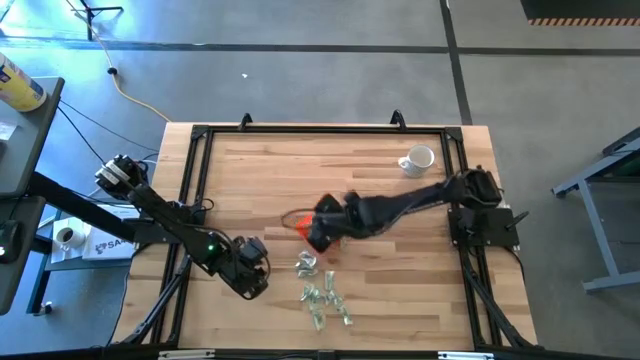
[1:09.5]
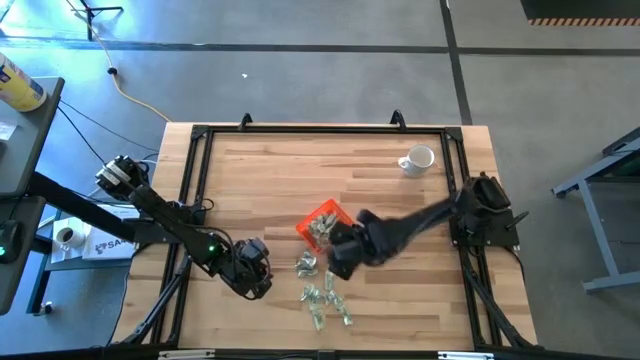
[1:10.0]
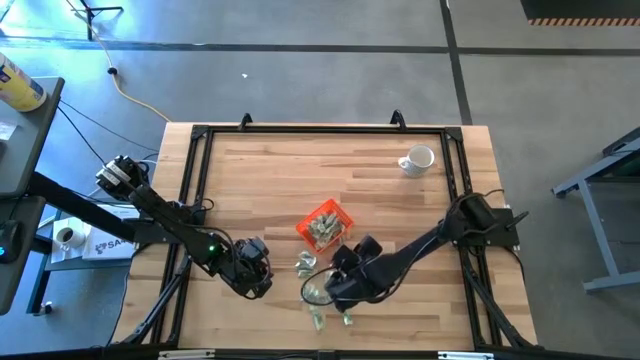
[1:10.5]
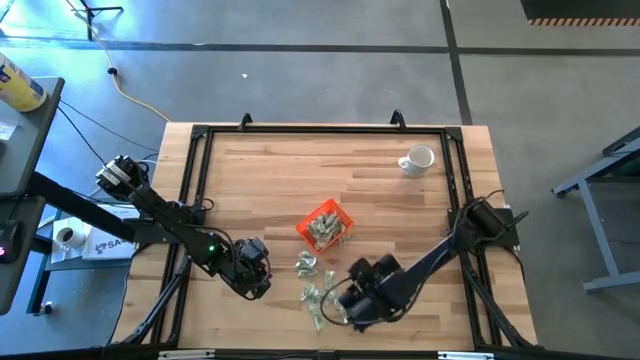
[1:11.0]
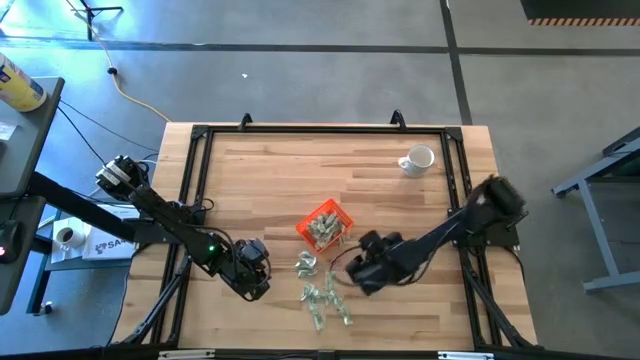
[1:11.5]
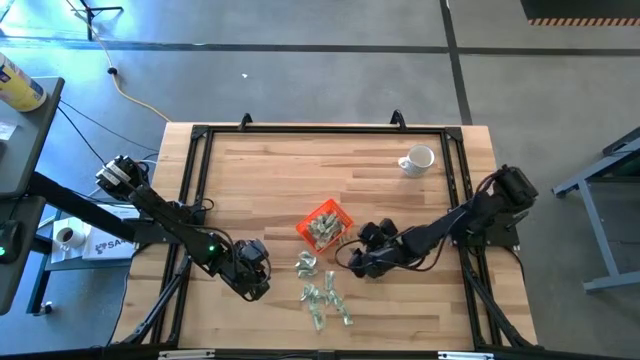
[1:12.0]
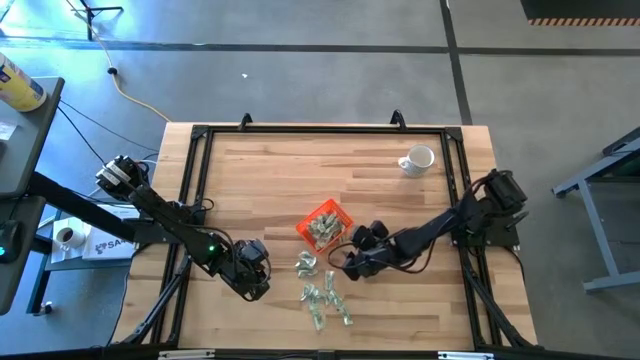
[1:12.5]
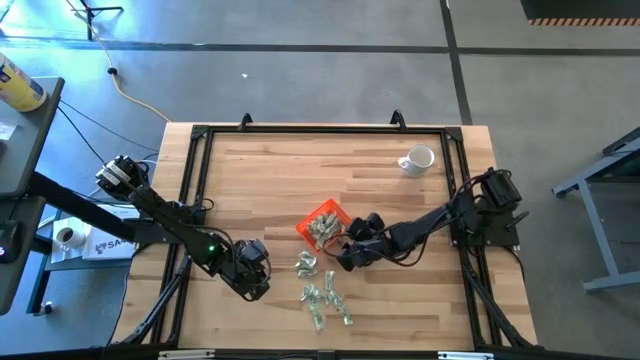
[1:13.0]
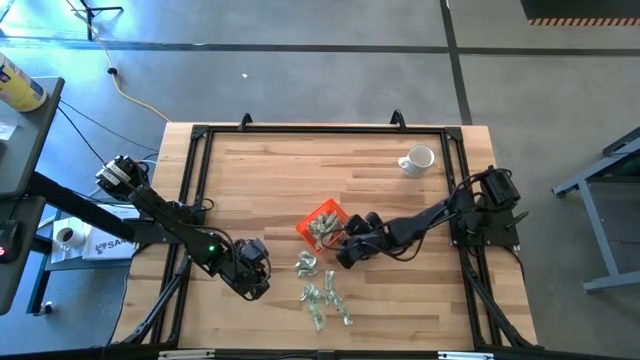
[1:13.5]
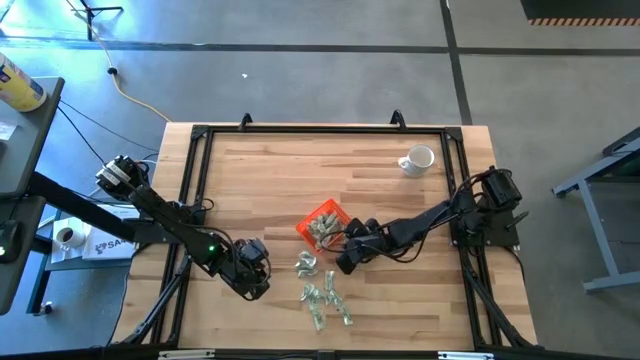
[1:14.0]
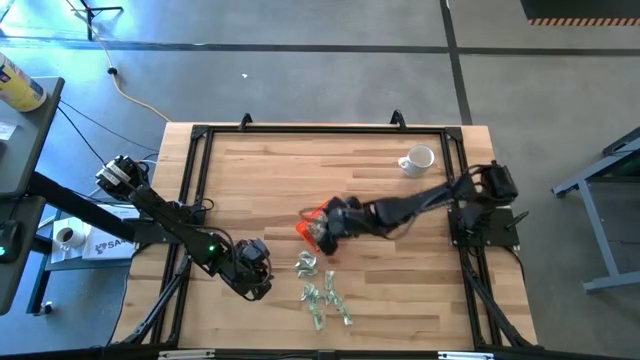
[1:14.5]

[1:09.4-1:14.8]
Task: Pick and place Stevia / Truvia into bins
Put the stevia packet into the orange bin

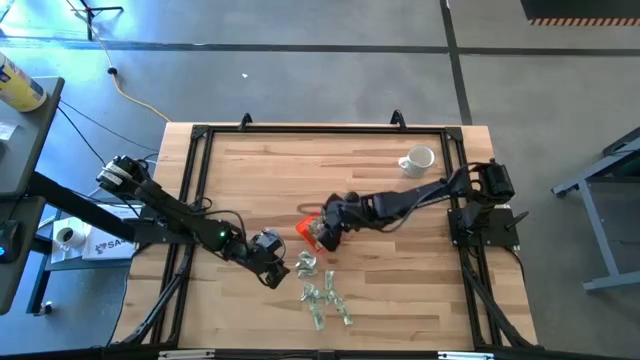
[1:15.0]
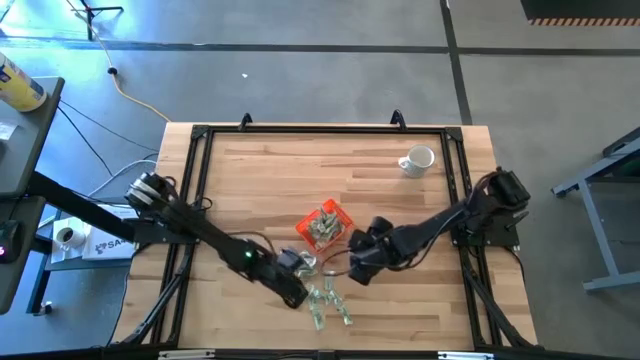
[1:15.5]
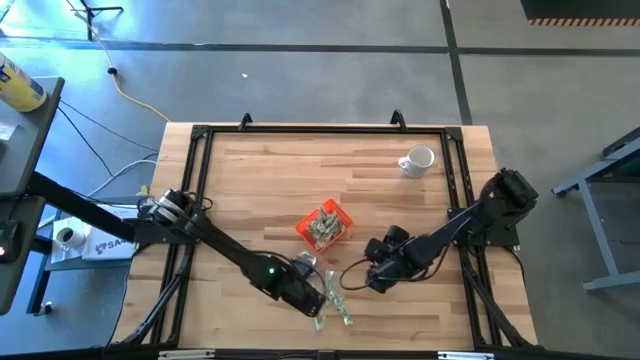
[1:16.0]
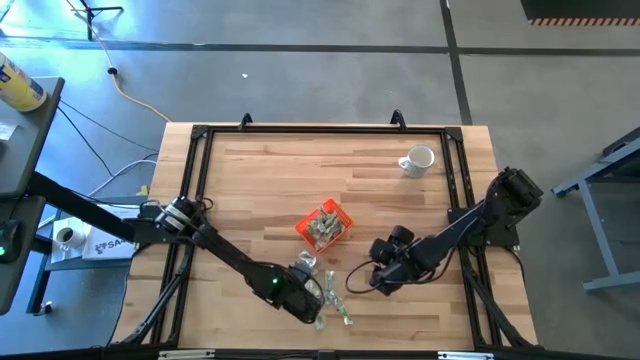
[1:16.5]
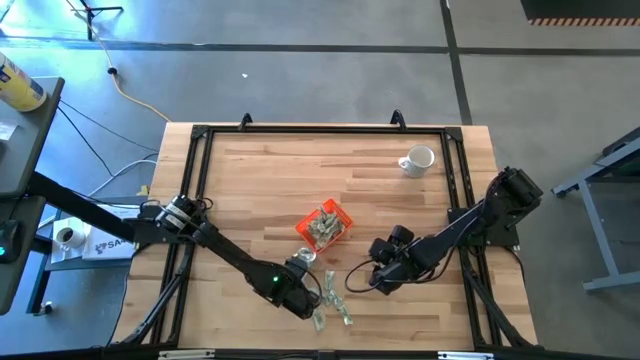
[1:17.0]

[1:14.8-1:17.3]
Put the stevia packet into the orange bin

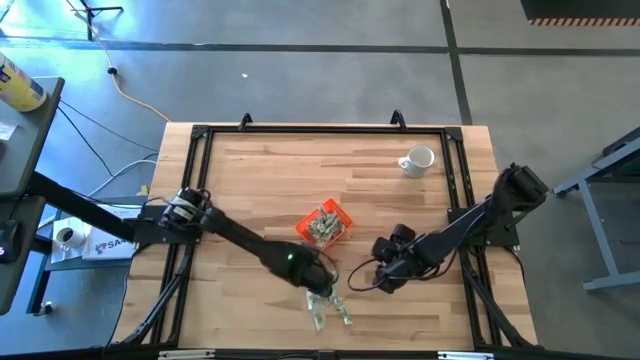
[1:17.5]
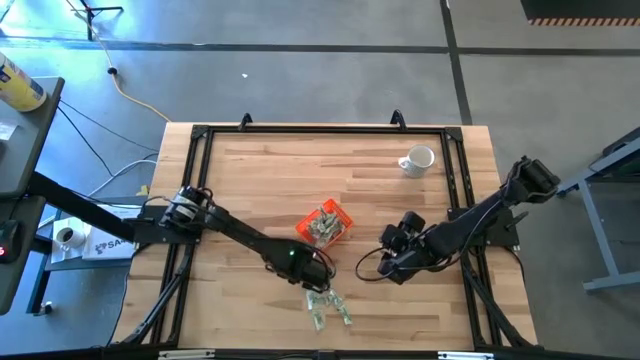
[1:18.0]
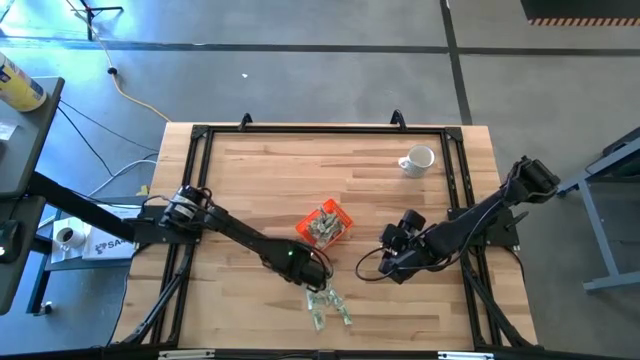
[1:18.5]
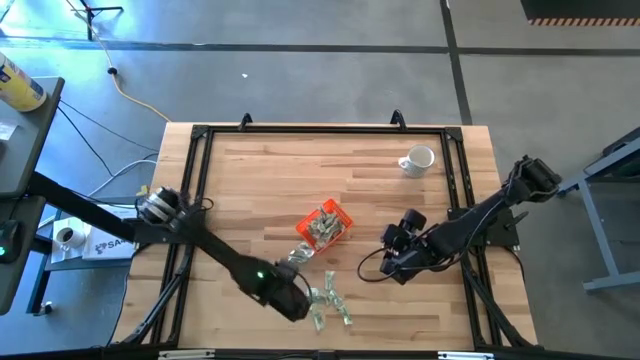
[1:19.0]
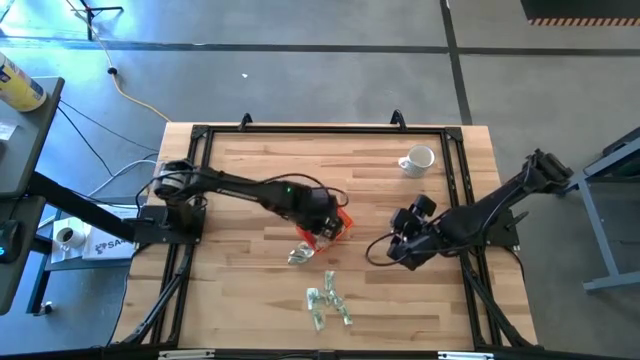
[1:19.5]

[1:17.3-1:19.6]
Put the stevia packet into the orange bin

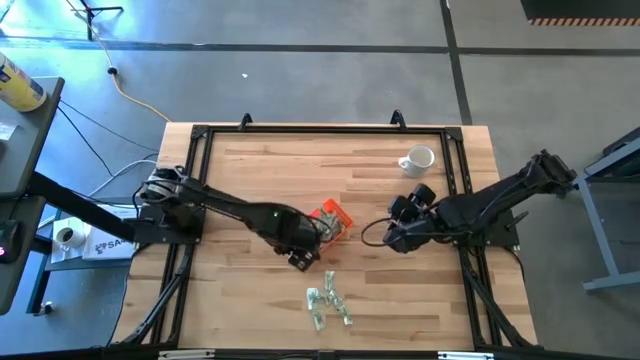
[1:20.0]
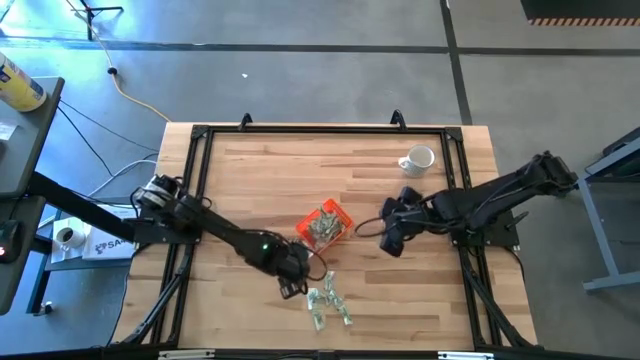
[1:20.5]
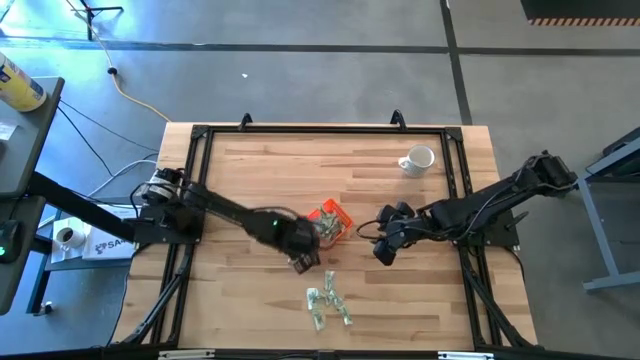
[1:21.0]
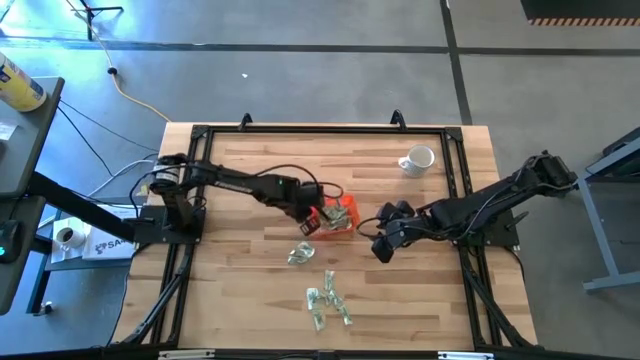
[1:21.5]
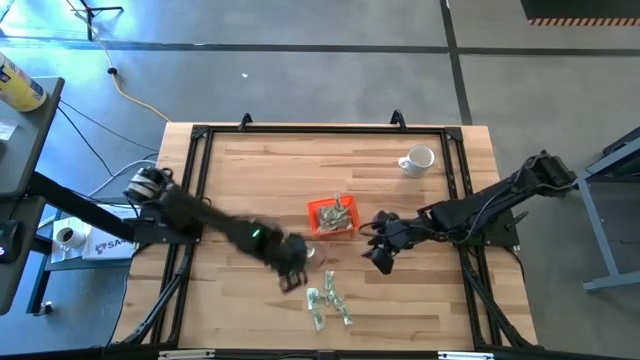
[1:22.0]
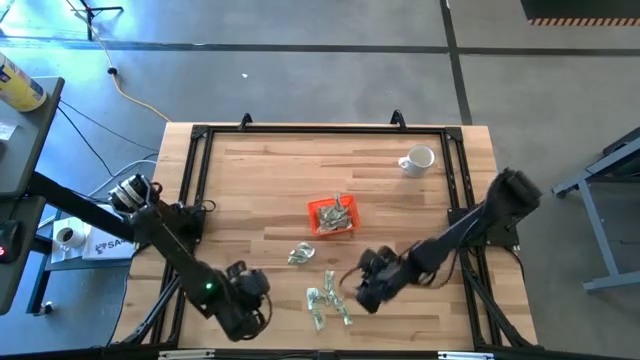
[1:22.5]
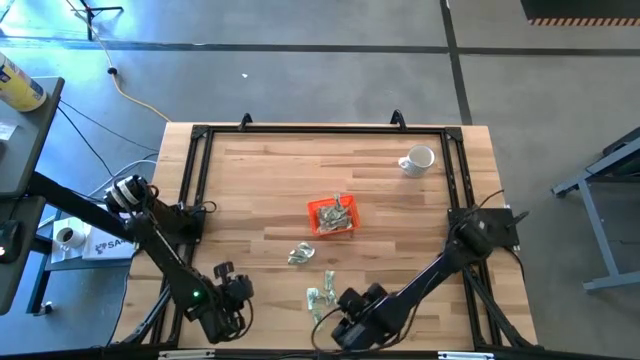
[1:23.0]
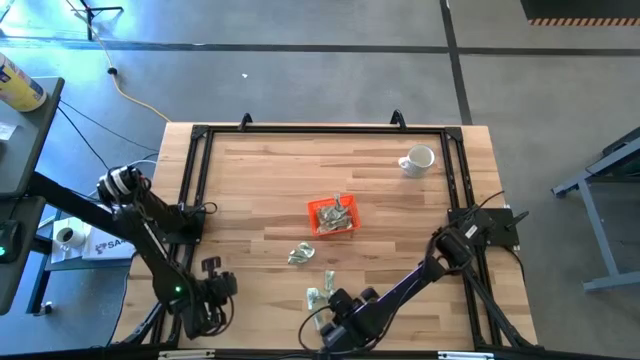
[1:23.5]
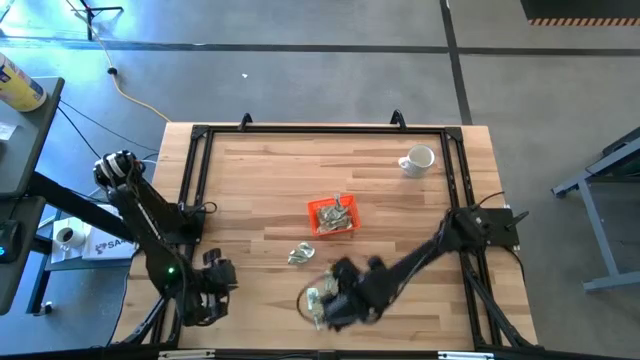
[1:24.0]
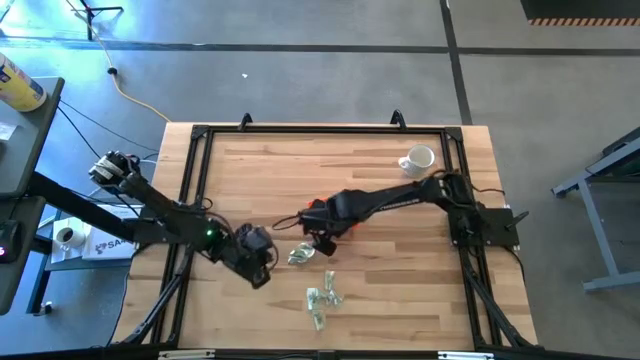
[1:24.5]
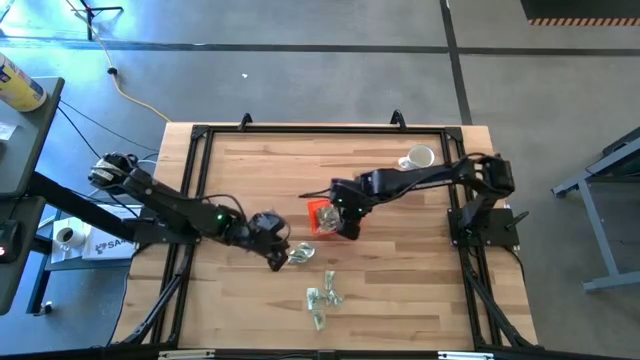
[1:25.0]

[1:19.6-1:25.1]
Put the stevia packet into the orange bin

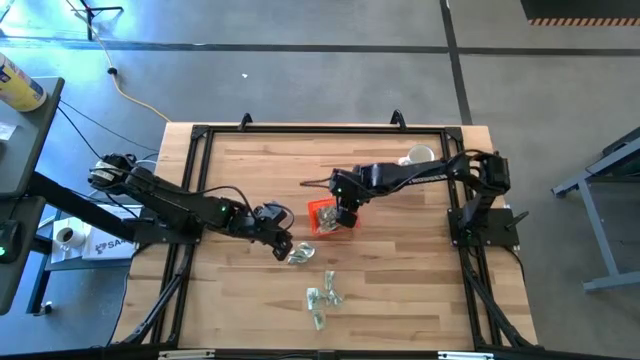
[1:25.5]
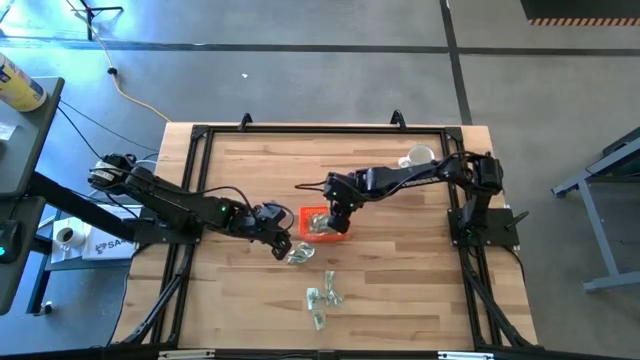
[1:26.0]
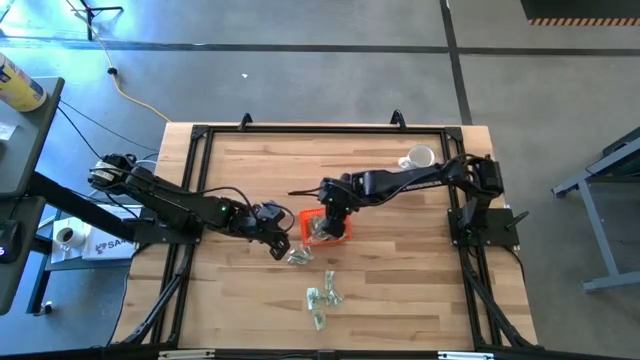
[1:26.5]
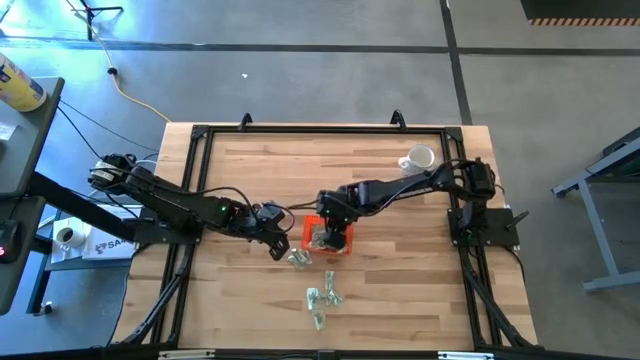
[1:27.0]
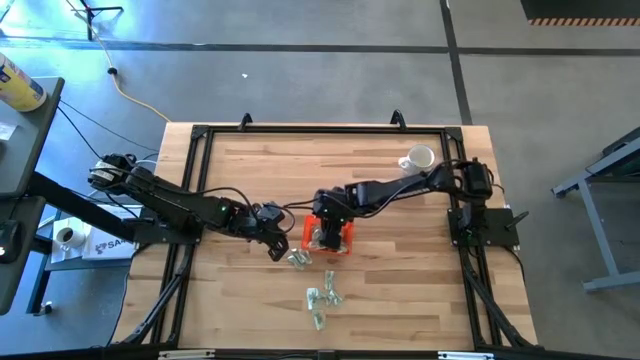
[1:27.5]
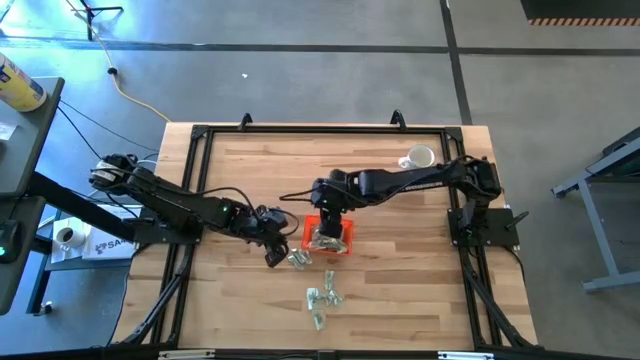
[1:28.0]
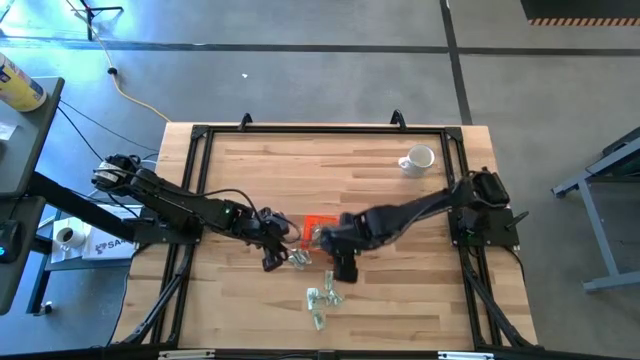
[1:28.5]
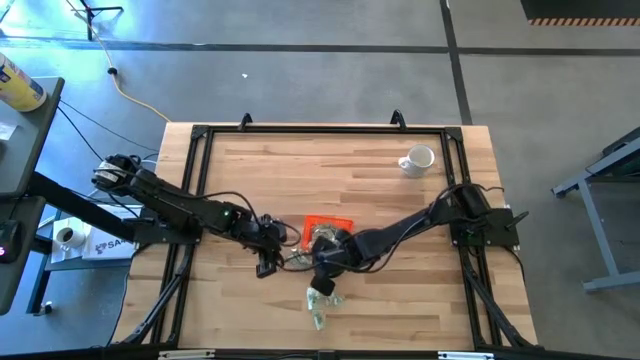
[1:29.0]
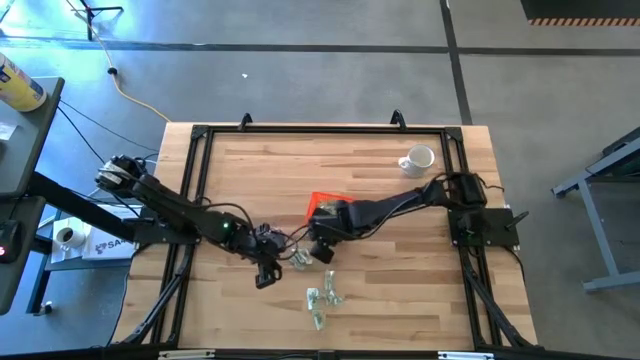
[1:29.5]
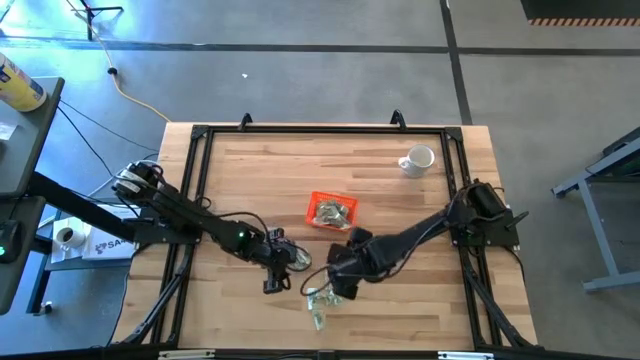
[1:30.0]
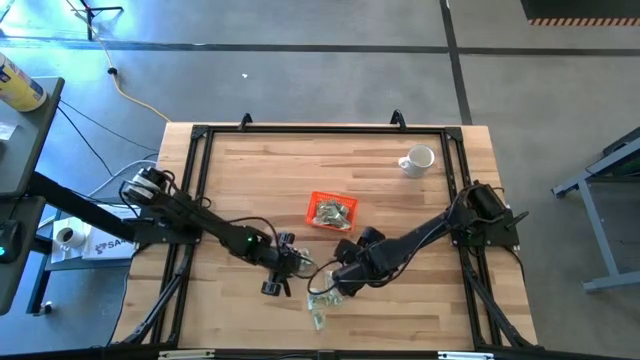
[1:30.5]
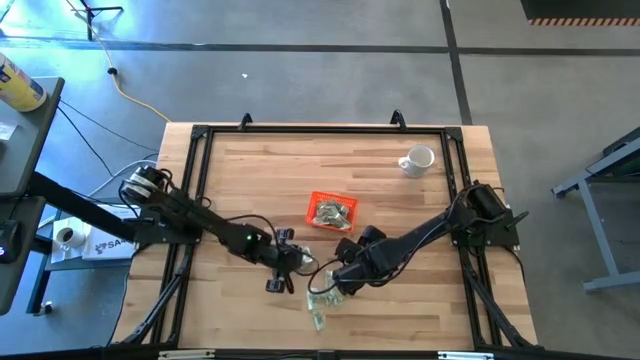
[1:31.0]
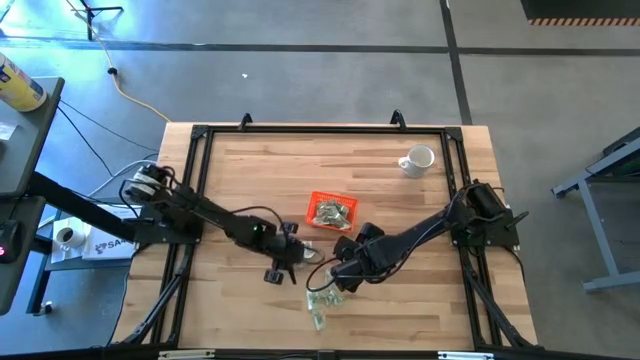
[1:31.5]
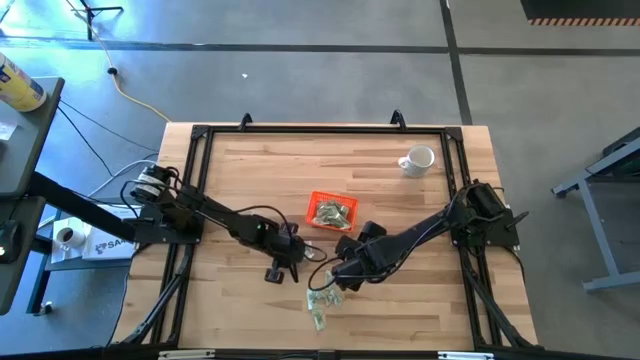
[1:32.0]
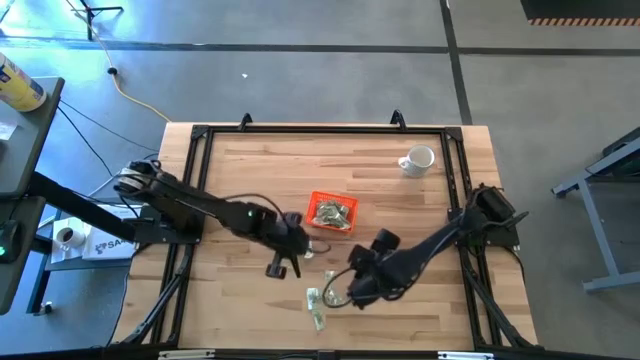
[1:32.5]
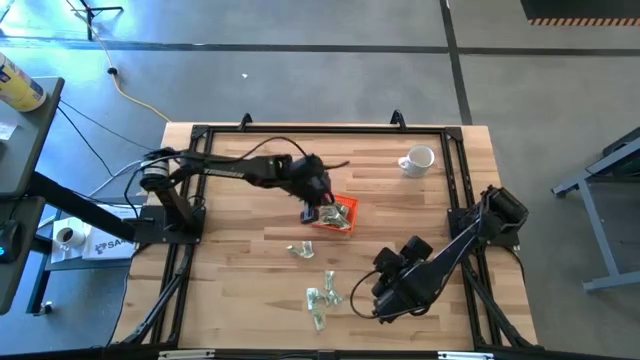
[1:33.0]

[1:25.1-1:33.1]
Put the stevia packet into the orange bin
